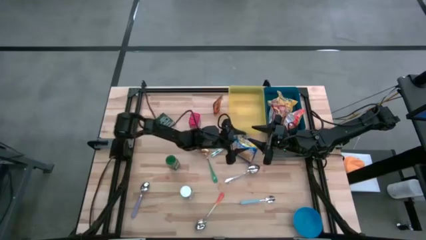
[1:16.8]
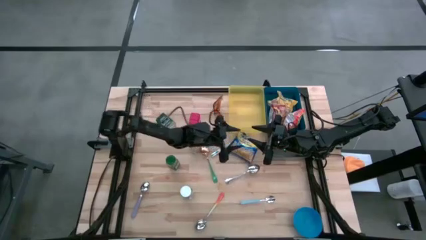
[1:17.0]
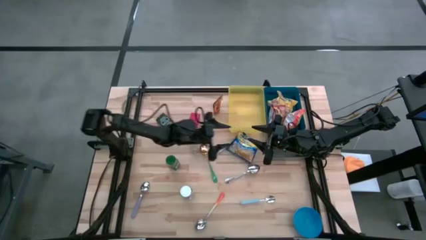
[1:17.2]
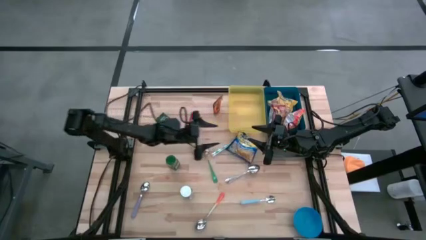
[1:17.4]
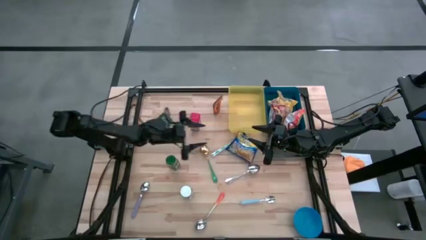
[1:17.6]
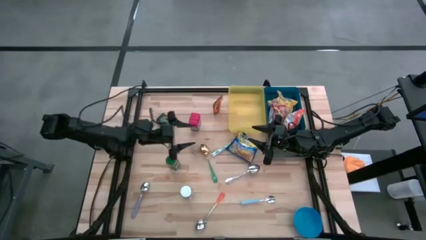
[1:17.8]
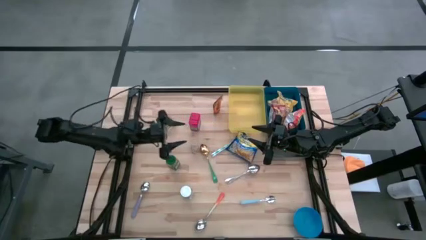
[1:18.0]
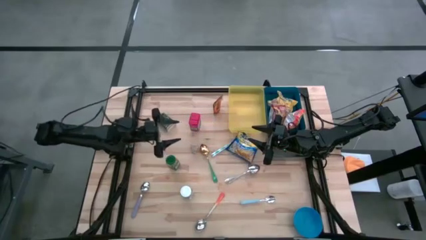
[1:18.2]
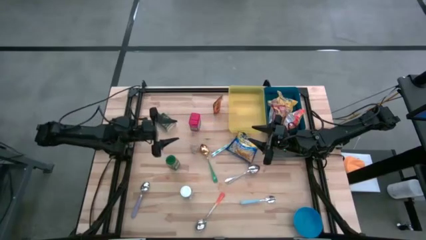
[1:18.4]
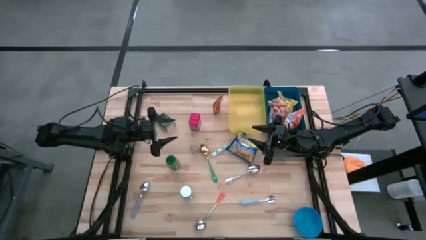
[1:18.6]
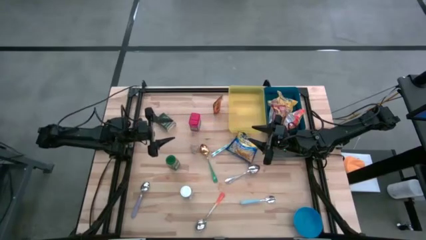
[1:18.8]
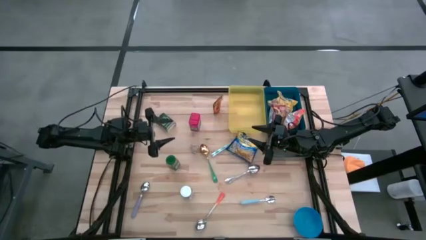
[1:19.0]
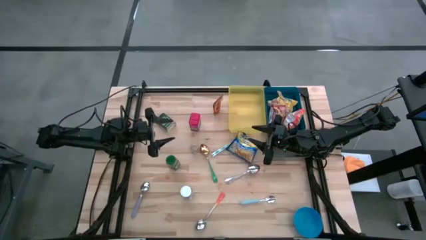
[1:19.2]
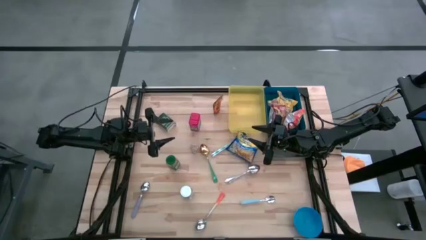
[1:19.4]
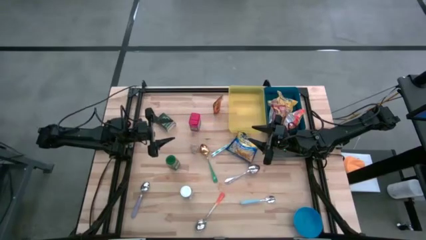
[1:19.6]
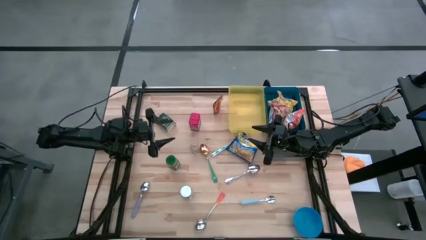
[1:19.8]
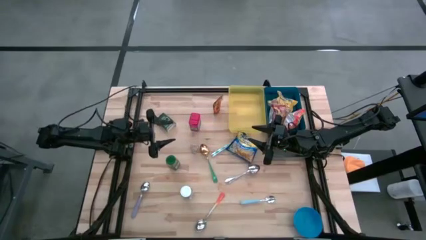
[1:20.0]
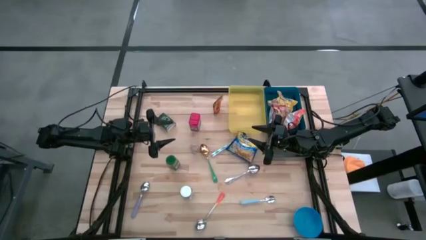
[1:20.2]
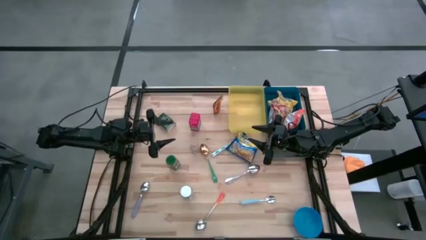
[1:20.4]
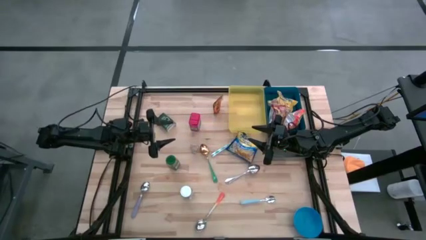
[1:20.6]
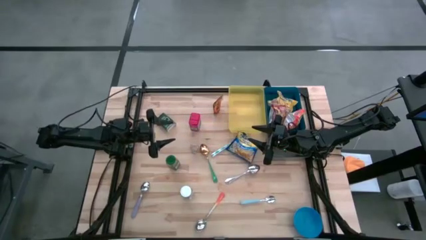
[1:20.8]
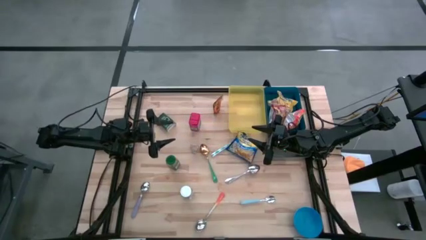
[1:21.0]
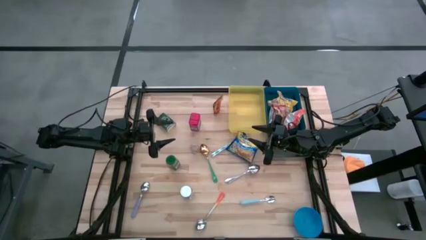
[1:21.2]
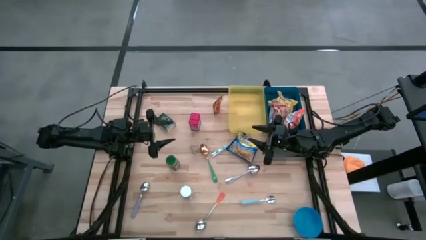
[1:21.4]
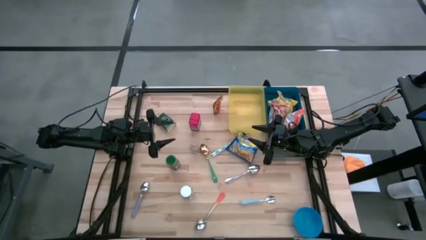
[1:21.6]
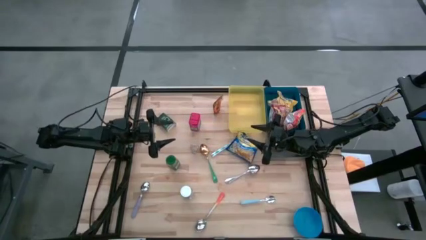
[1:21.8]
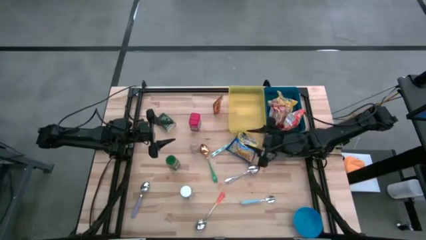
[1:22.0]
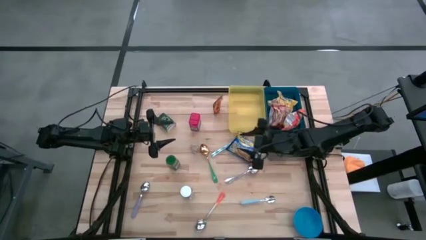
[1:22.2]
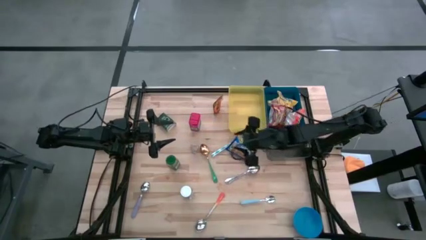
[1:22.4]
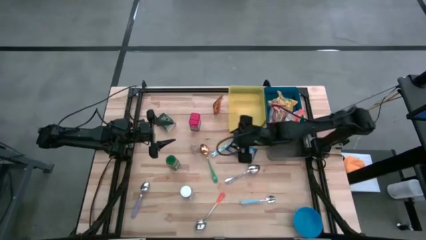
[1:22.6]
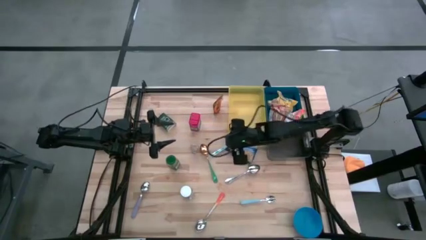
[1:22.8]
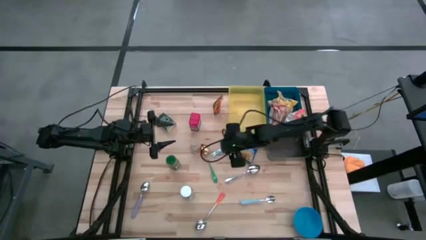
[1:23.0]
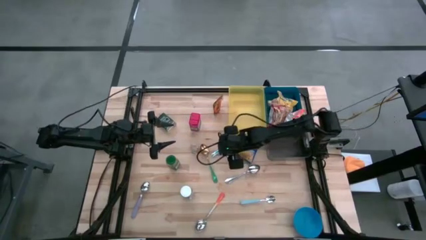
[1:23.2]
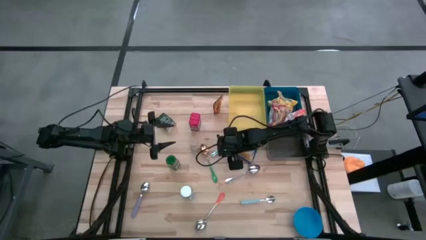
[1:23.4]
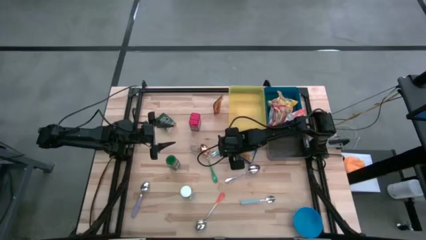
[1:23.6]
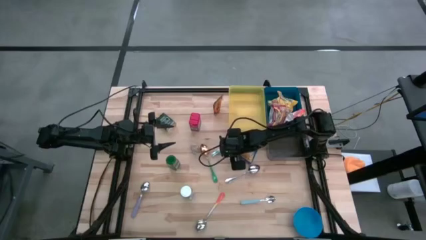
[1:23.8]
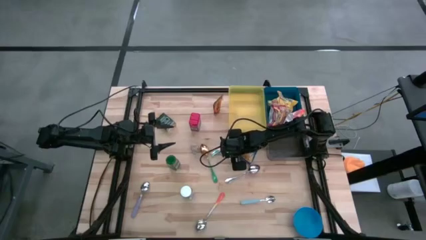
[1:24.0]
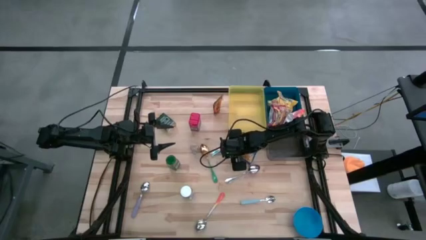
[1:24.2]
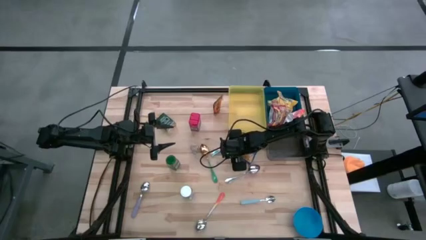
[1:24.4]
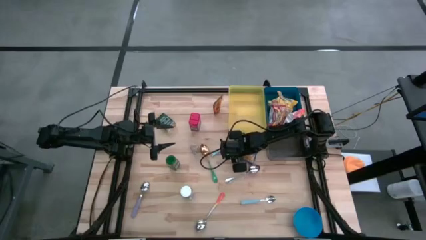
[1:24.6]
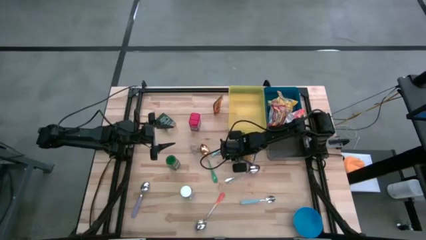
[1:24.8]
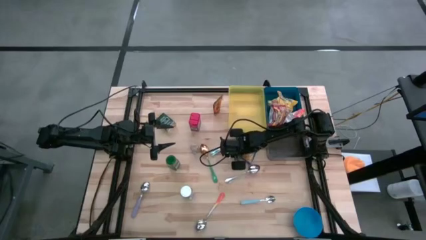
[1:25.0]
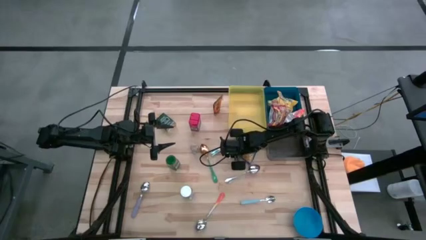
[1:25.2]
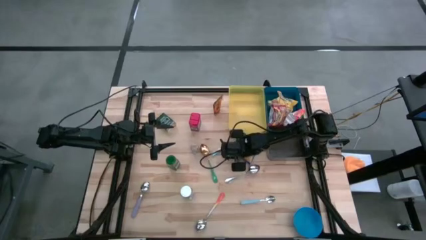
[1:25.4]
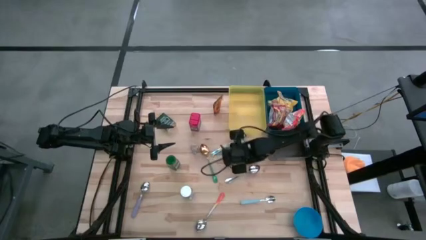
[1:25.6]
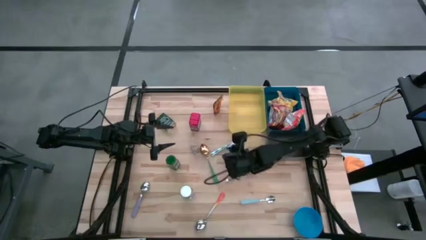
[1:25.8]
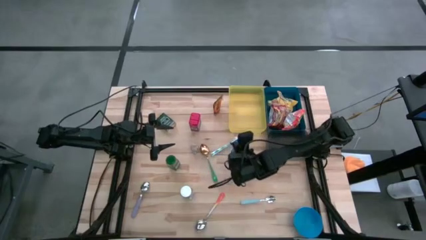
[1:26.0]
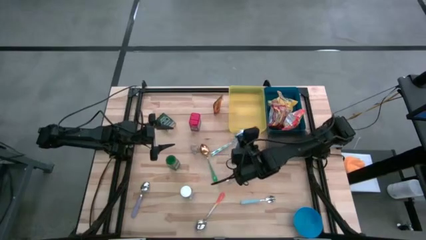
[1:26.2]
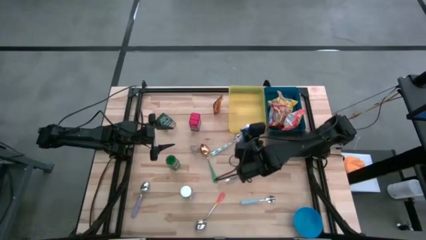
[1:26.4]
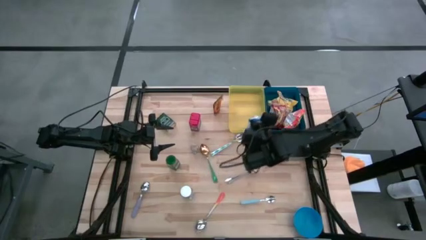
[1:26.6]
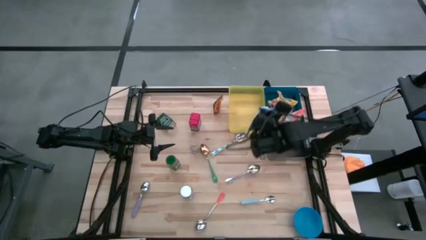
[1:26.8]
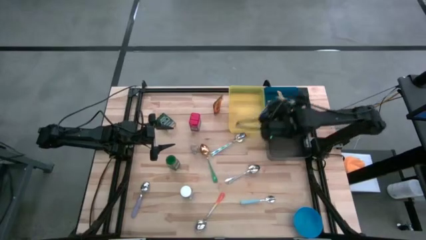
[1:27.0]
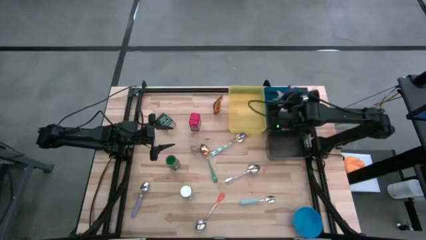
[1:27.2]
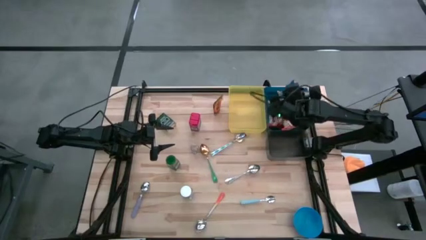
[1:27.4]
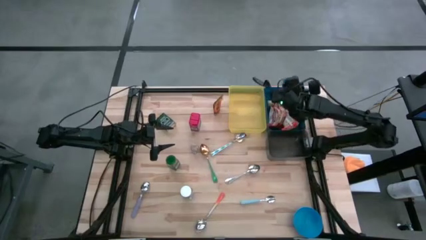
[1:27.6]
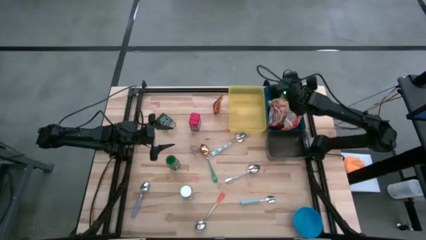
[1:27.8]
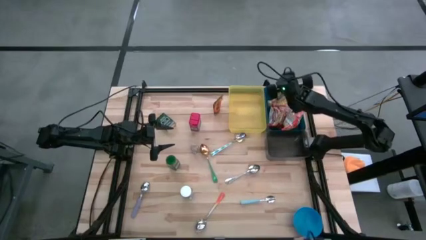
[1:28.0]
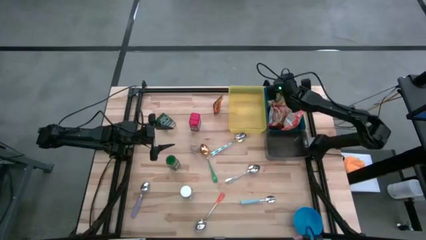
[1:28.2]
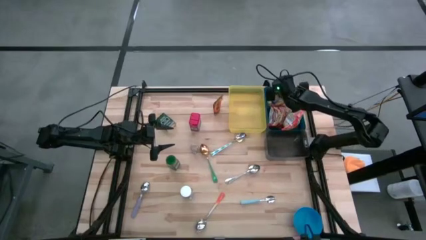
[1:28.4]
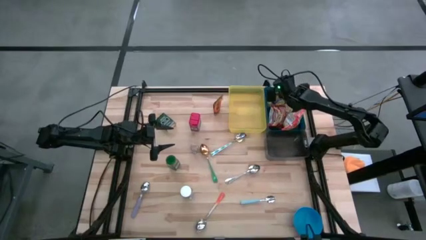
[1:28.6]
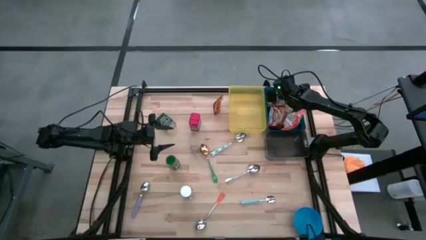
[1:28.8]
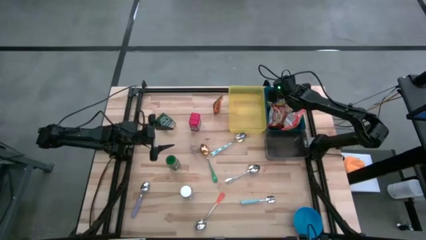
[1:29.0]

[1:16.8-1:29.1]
Put the blue noodle pack into the blue bin

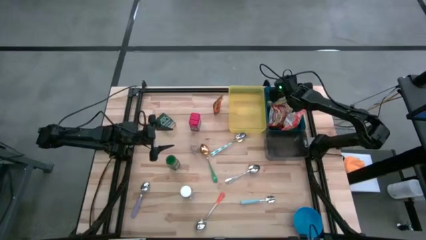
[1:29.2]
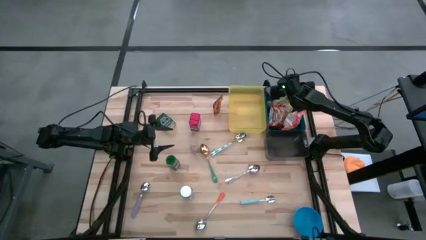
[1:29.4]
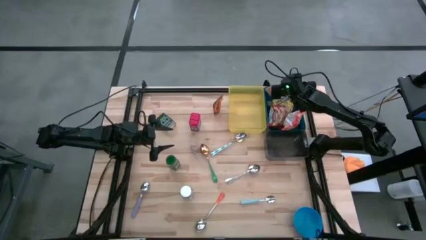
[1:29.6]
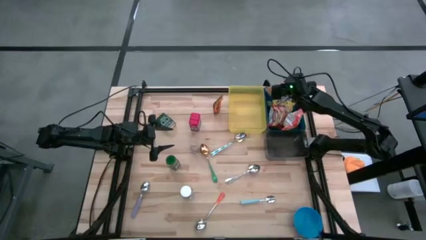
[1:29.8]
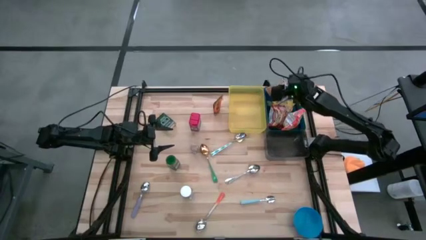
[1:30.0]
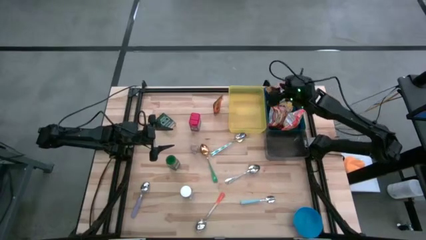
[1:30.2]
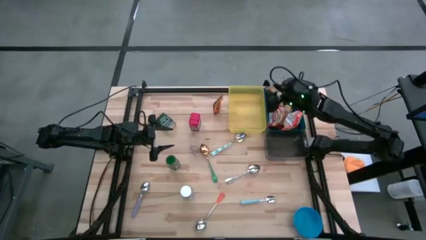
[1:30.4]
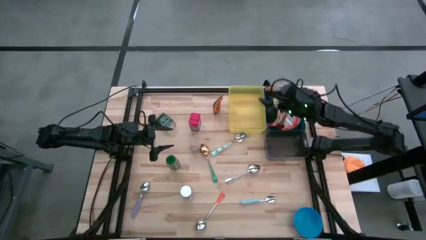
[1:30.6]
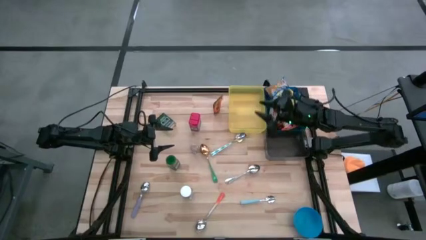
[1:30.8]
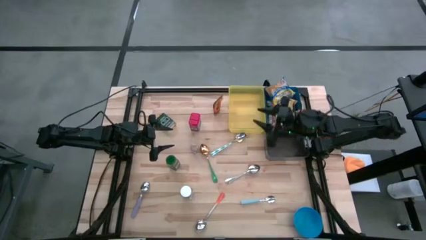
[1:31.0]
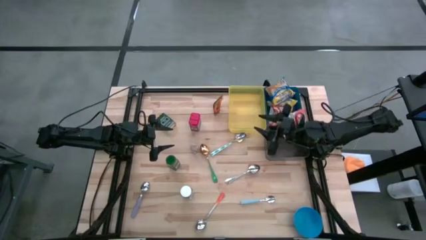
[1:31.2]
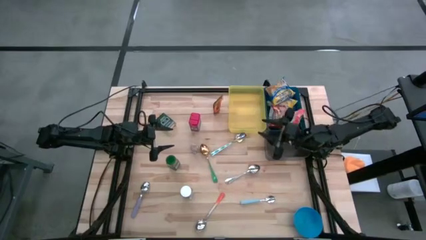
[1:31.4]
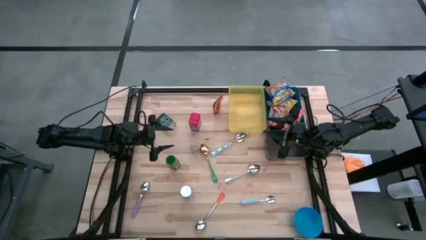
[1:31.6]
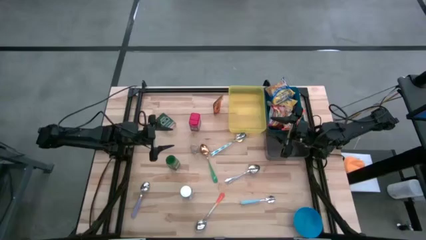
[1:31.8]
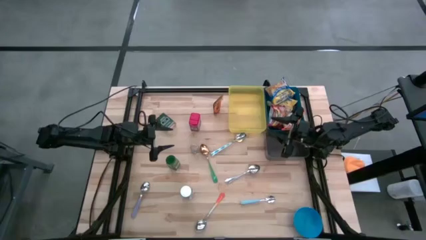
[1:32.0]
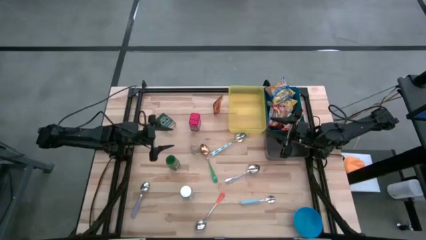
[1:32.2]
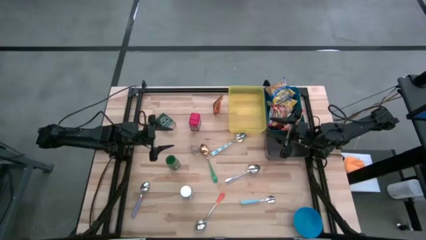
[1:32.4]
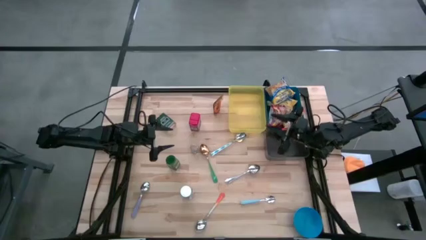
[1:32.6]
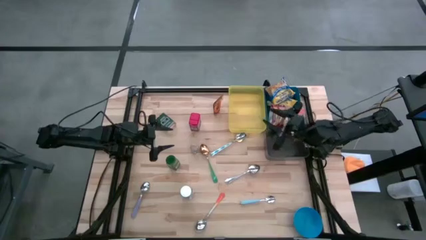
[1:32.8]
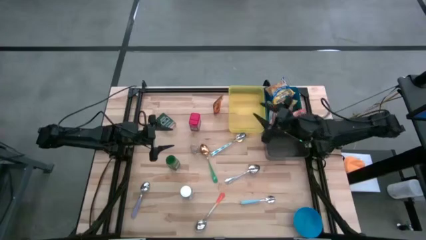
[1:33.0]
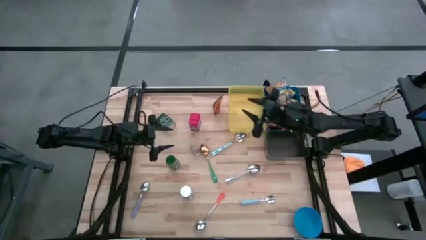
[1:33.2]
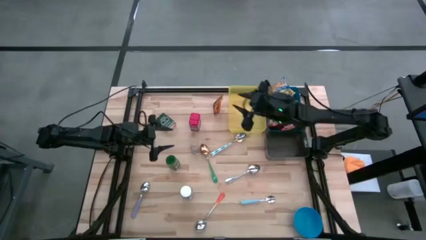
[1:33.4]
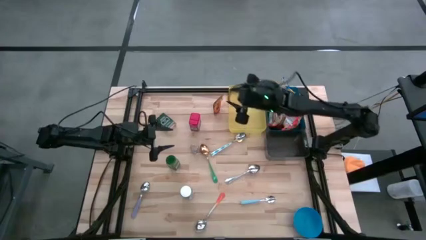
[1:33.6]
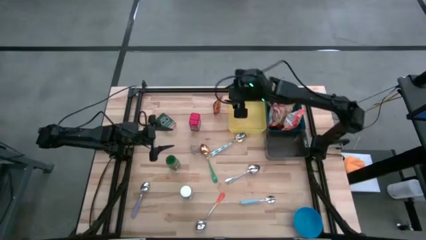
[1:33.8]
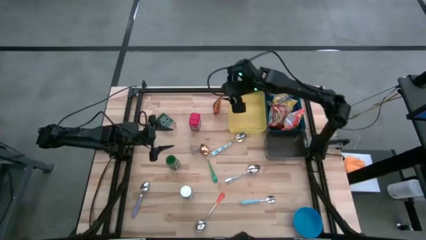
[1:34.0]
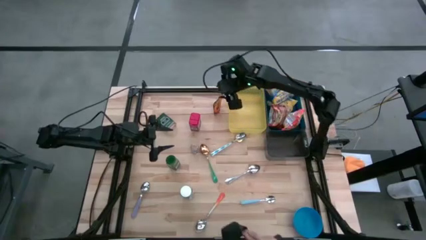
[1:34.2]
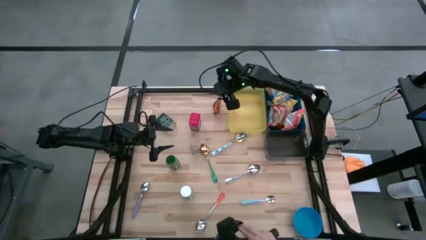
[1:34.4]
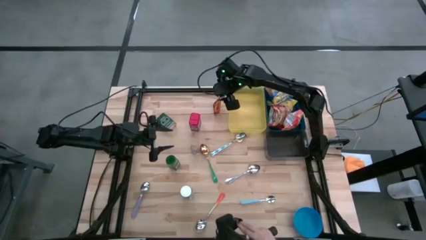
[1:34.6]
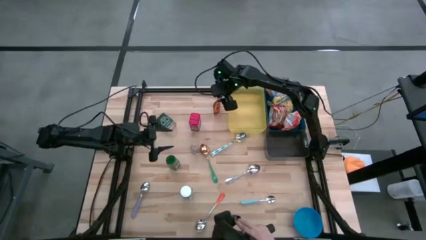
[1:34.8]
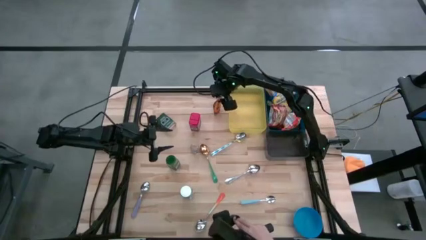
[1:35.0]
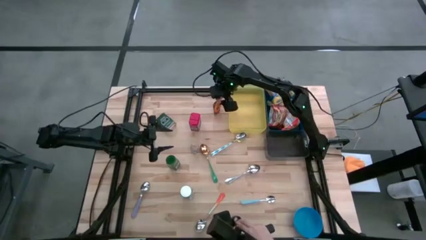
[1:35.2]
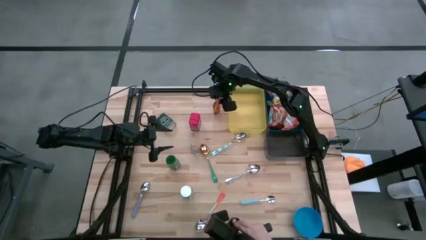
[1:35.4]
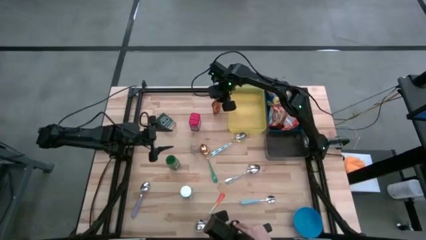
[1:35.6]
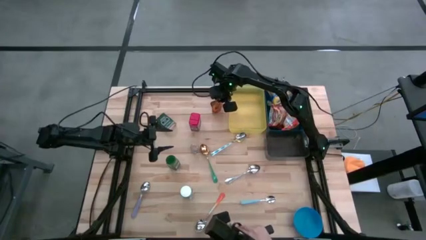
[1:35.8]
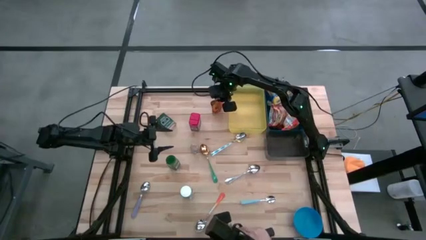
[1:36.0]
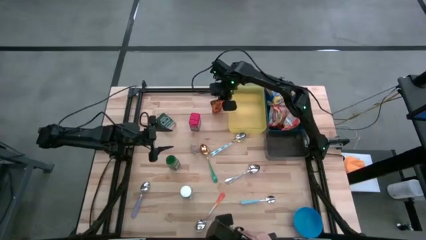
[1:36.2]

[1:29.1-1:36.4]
Put the orange seasoning bag into the black bin
